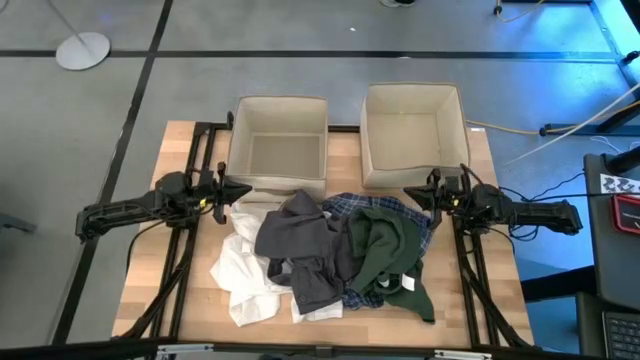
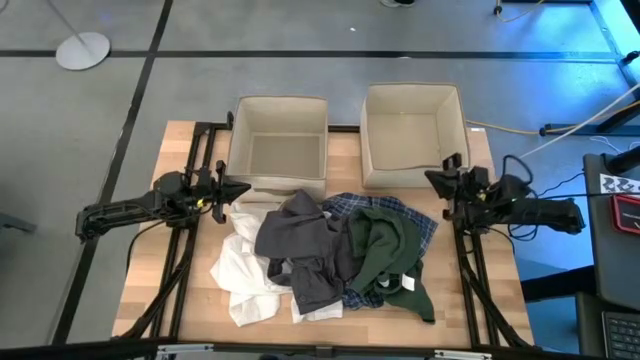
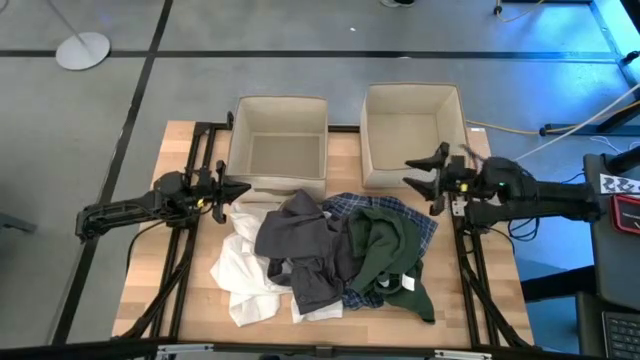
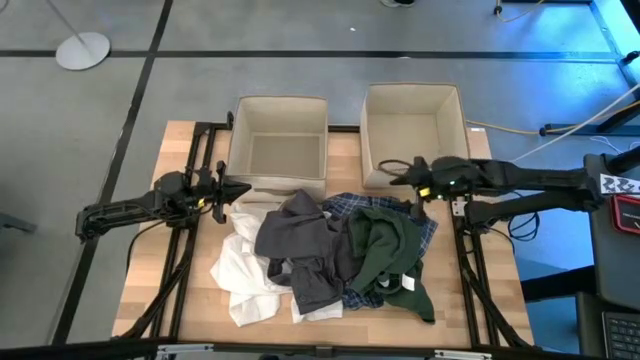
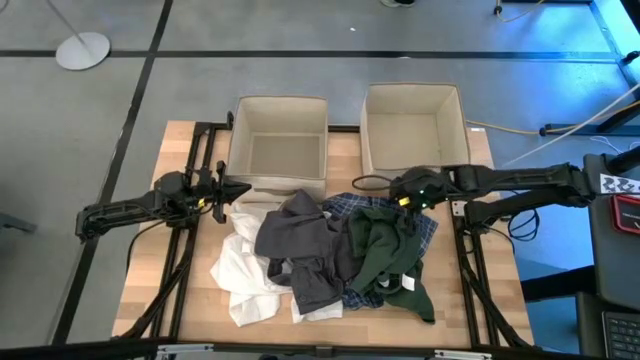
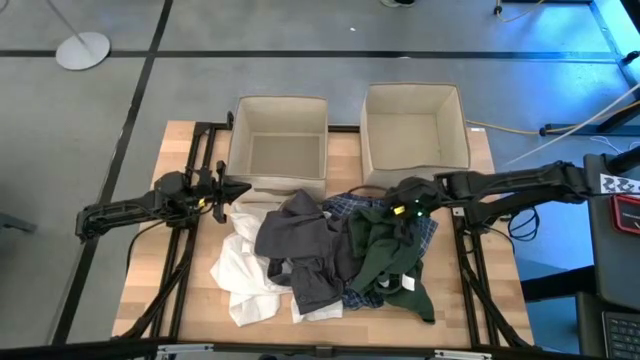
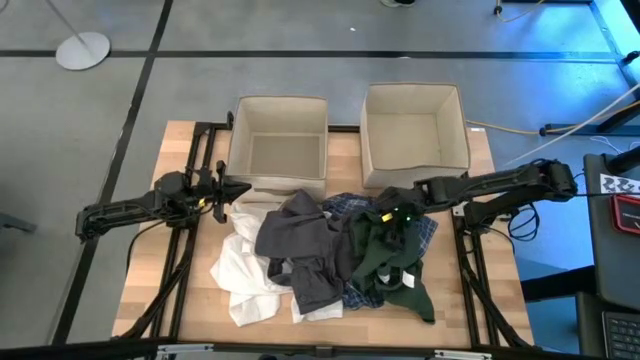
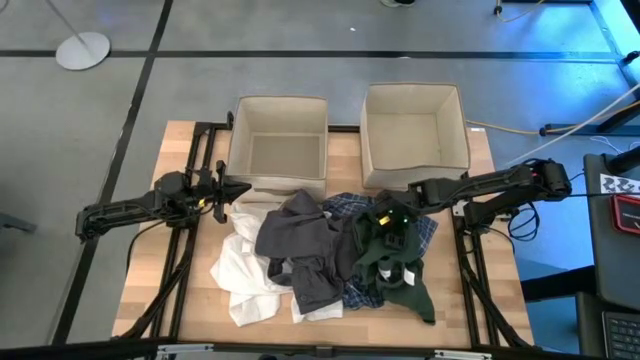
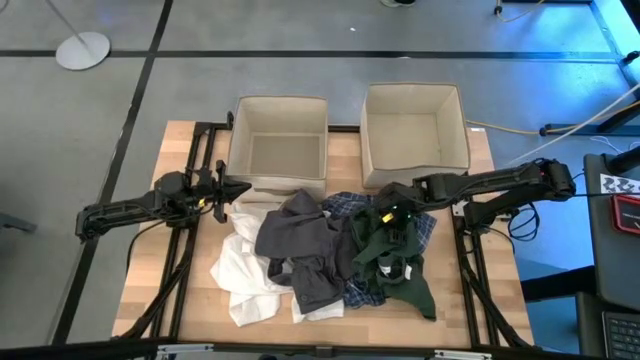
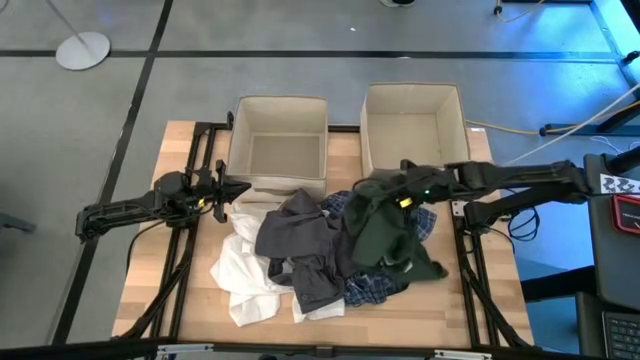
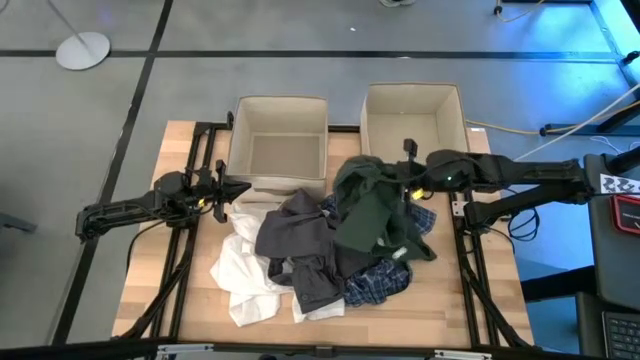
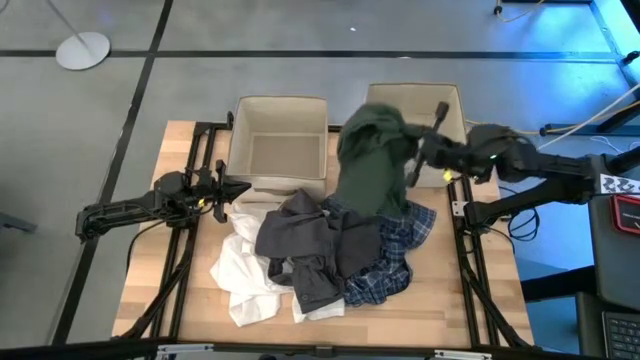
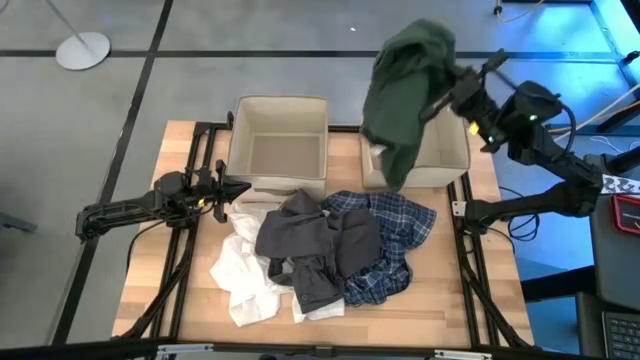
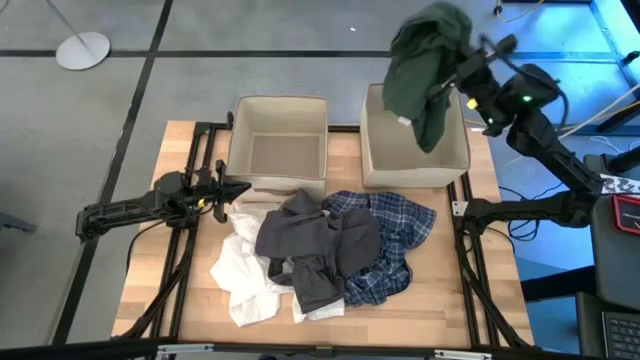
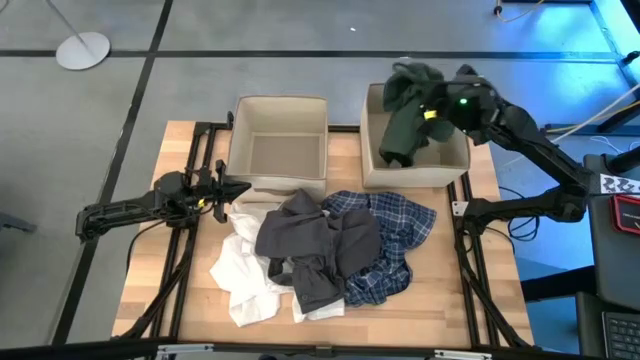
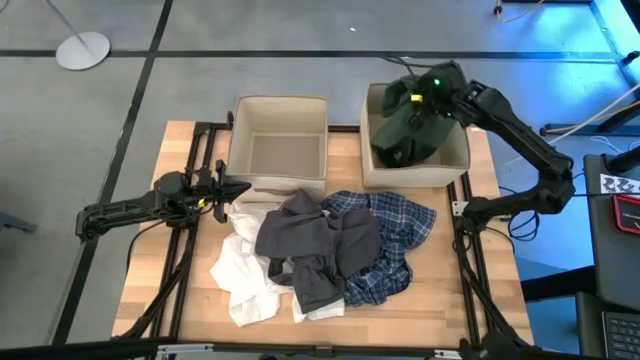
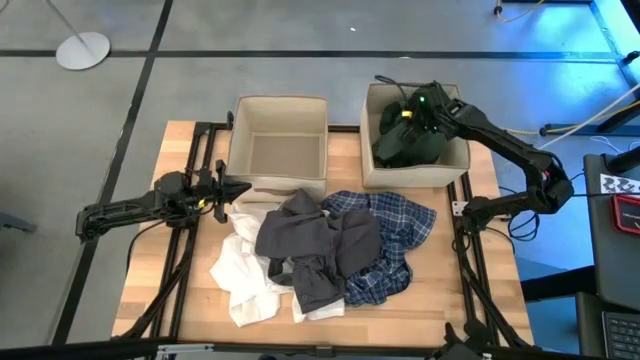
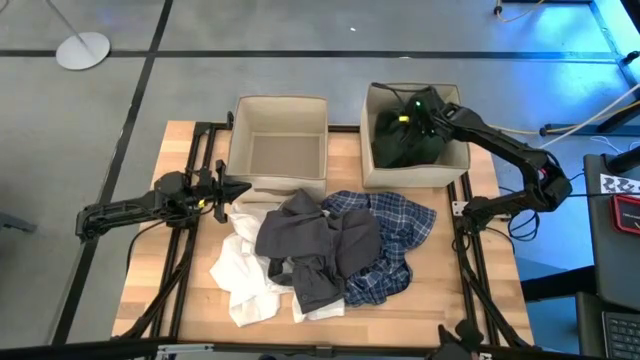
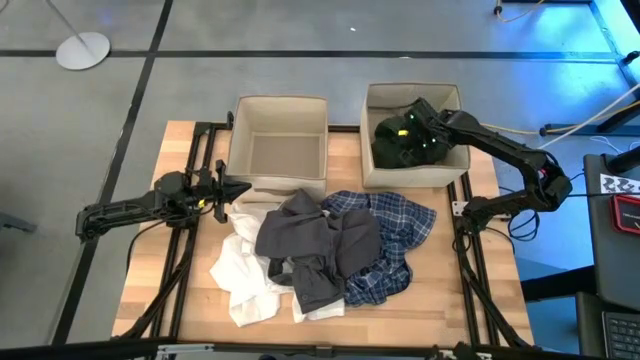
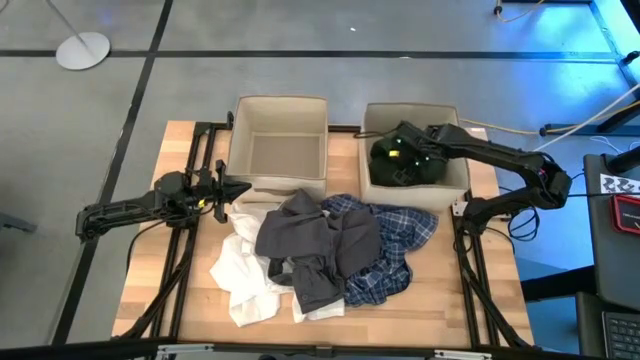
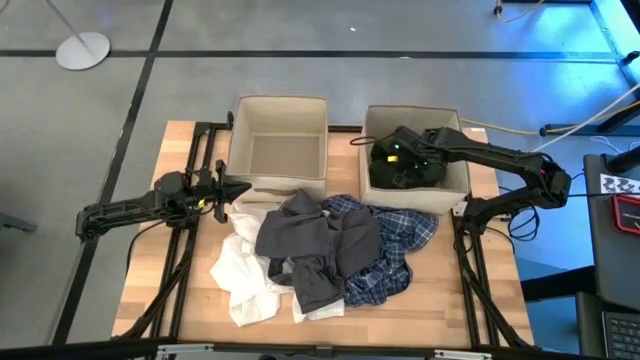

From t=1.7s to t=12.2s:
Task: Sort clothes
Put the green shirt in the right laundry organizer

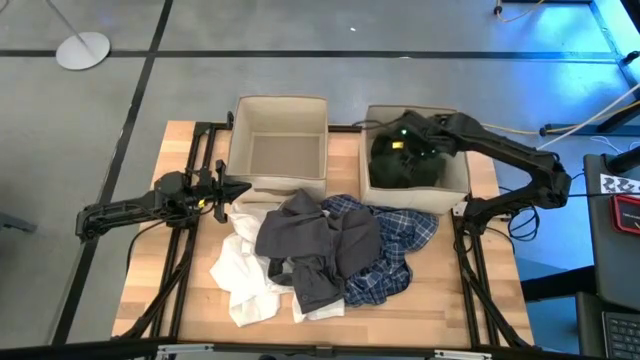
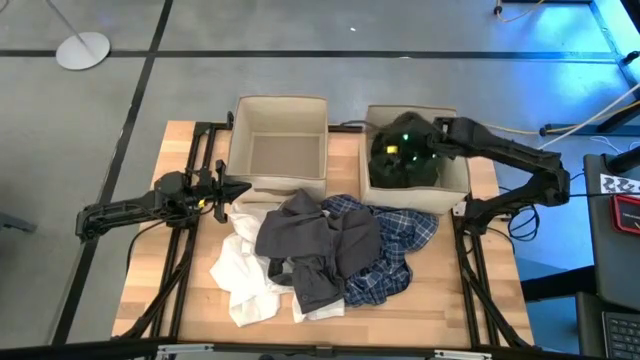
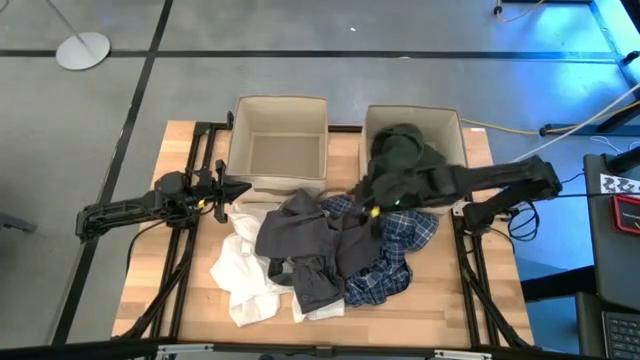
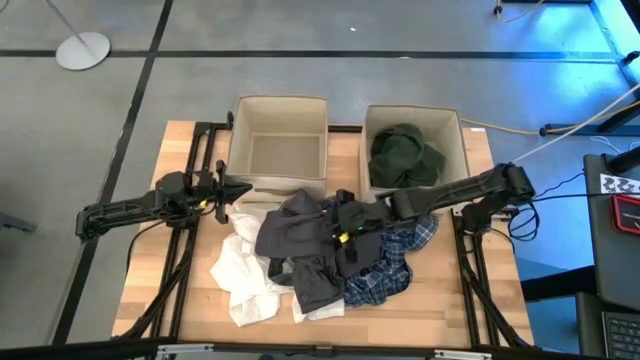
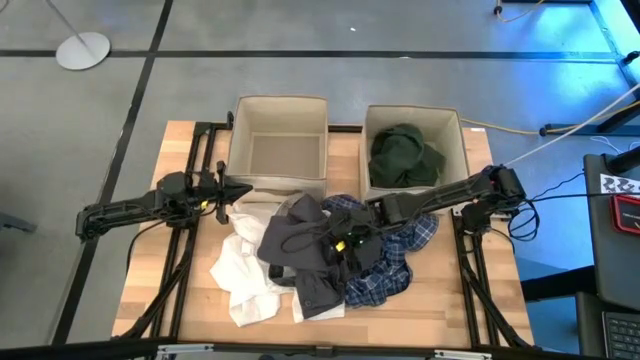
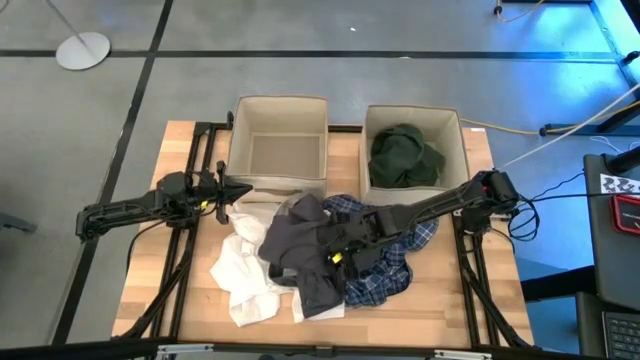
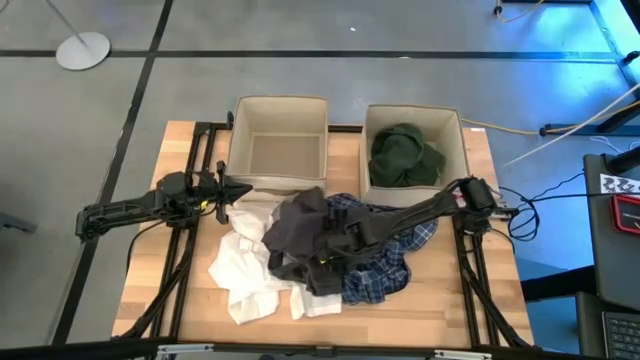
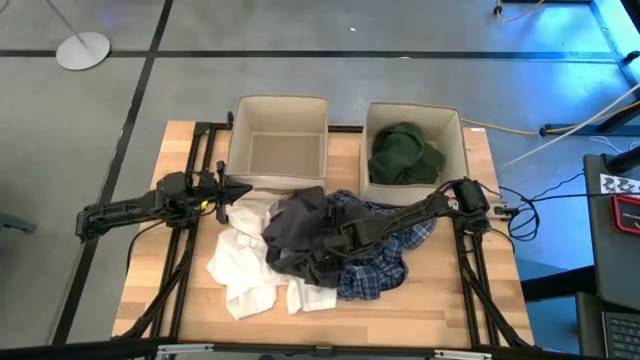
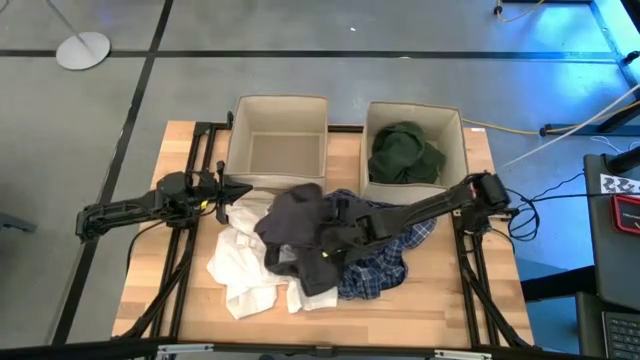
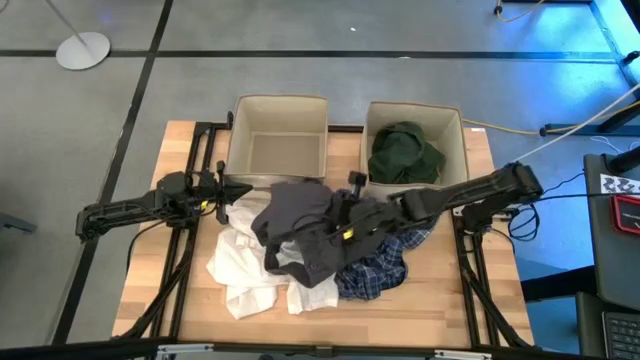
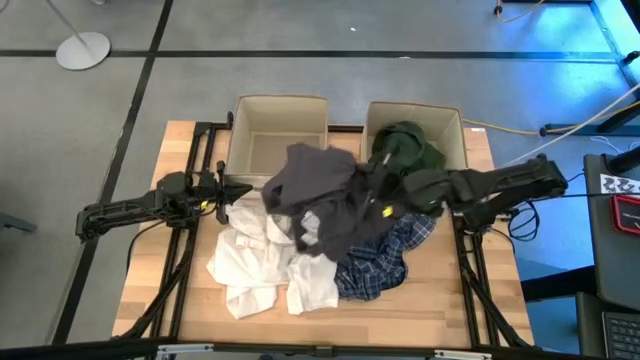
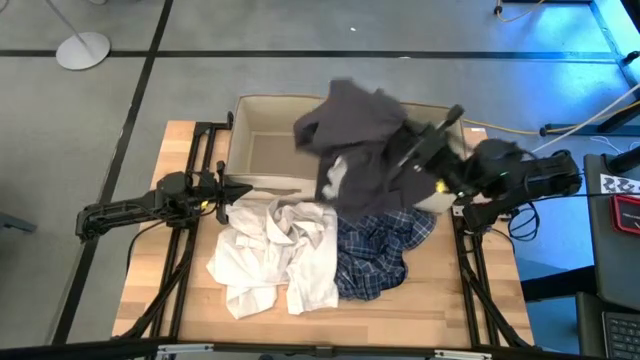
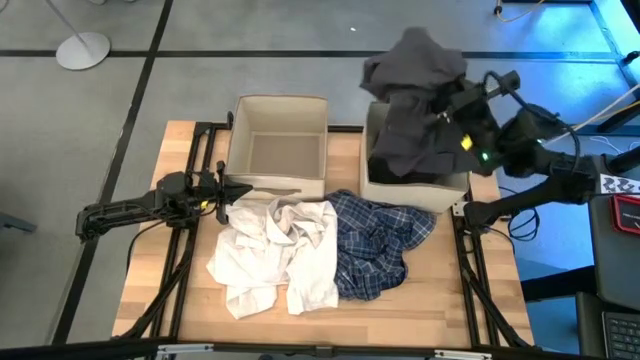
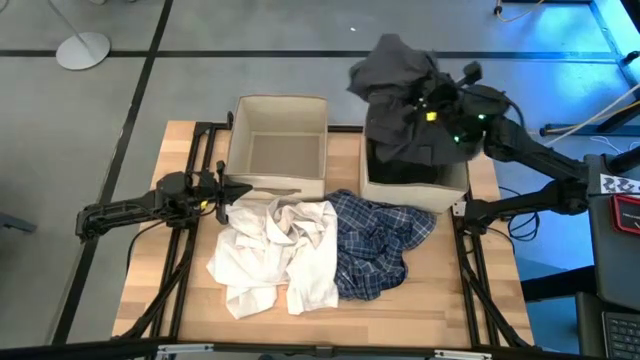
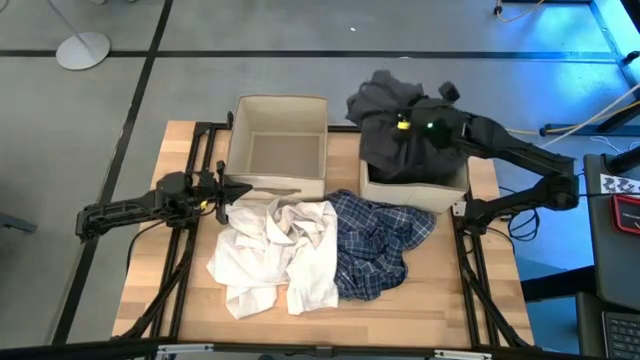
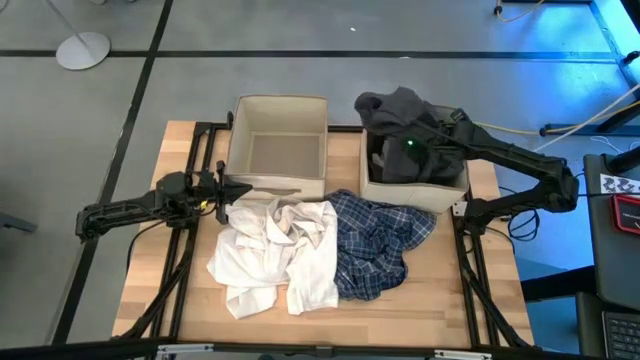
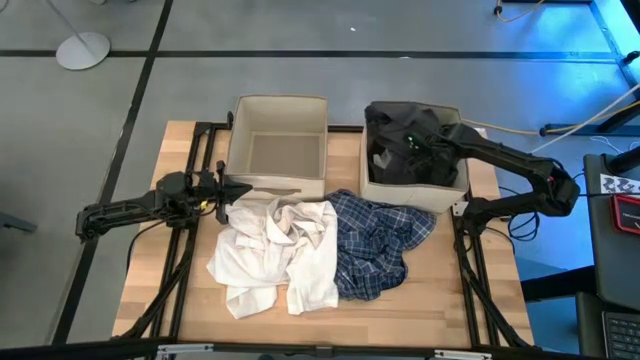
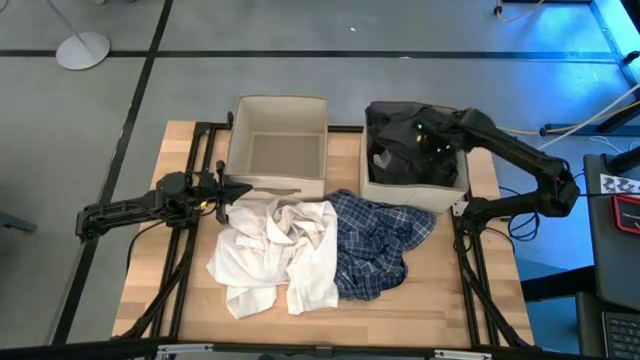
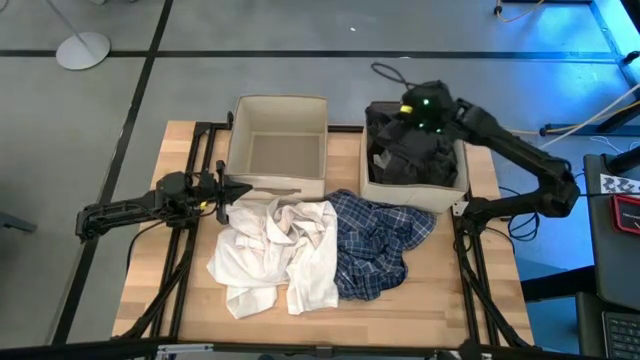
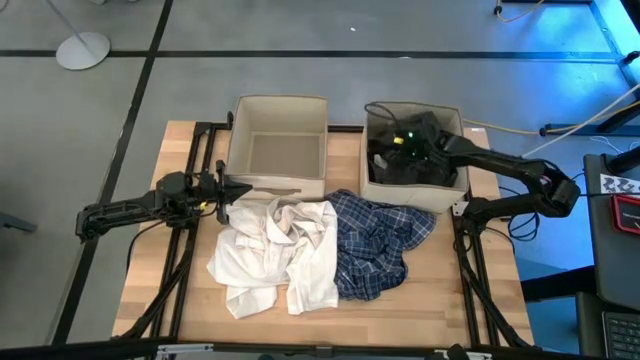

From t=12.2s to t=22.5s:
Put the gray pants in the right laundry organizer
